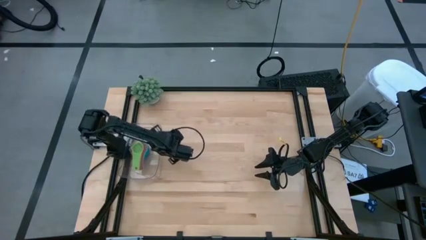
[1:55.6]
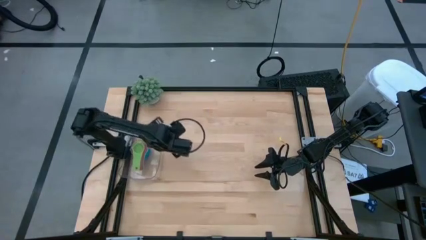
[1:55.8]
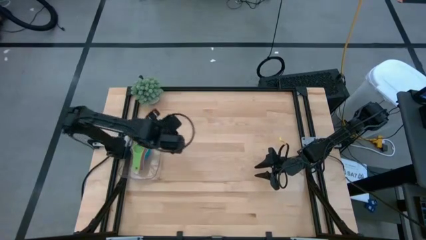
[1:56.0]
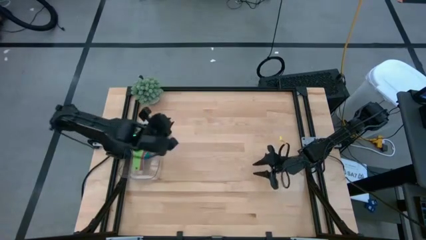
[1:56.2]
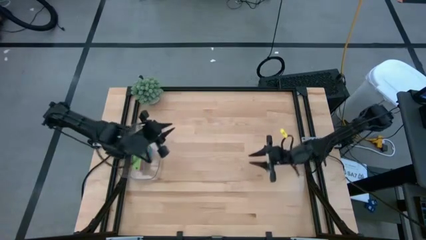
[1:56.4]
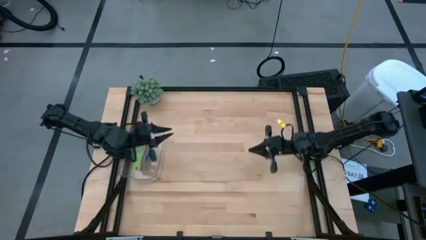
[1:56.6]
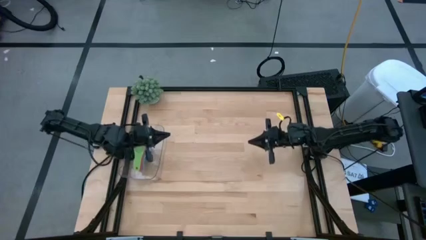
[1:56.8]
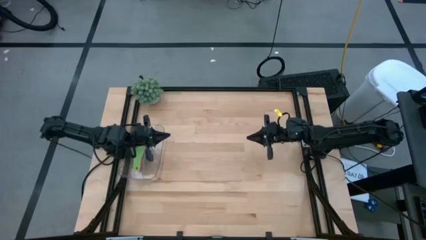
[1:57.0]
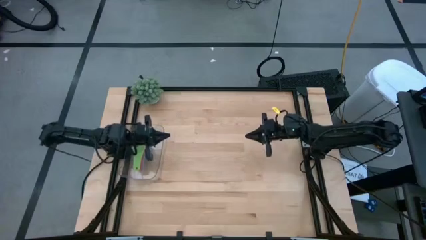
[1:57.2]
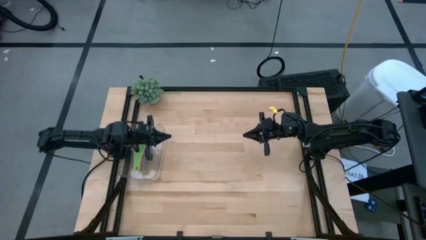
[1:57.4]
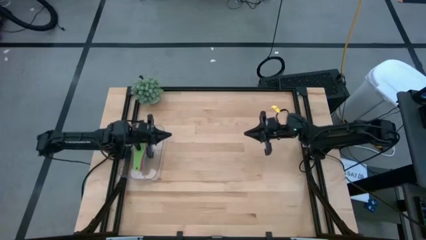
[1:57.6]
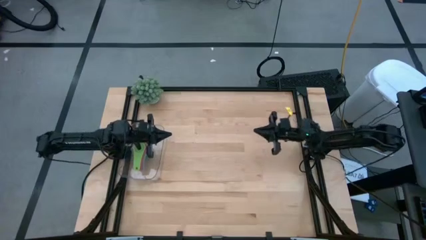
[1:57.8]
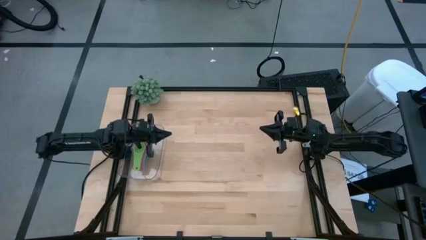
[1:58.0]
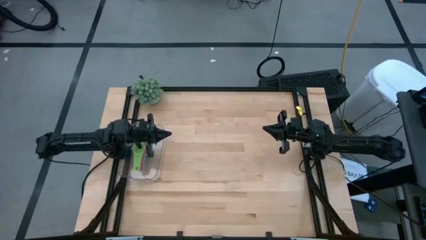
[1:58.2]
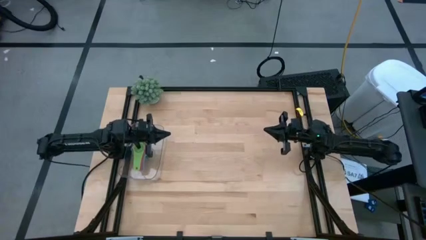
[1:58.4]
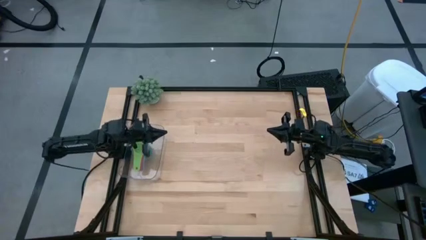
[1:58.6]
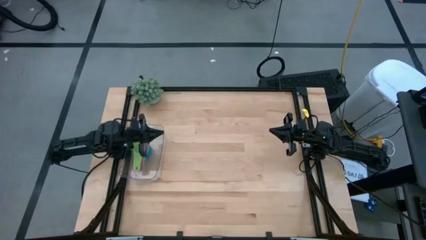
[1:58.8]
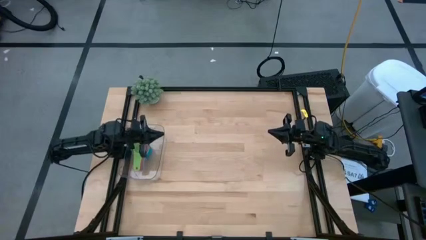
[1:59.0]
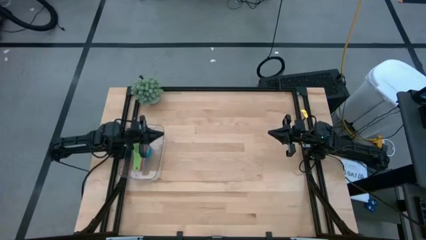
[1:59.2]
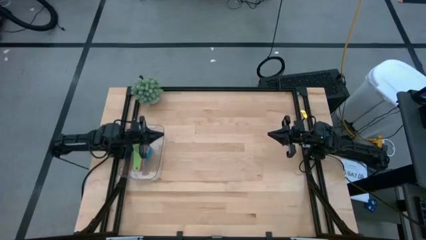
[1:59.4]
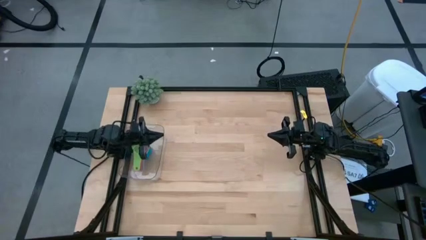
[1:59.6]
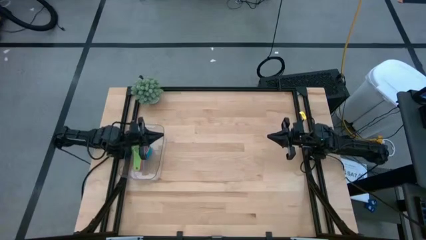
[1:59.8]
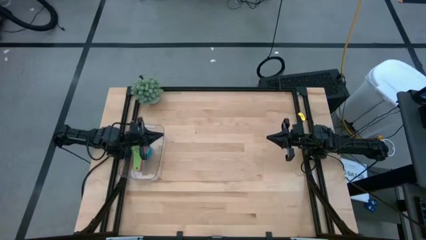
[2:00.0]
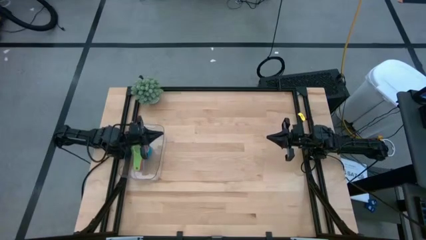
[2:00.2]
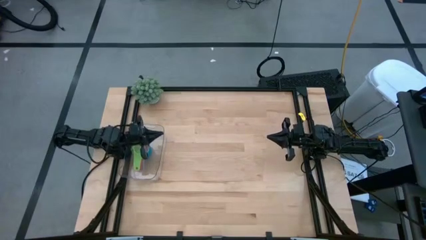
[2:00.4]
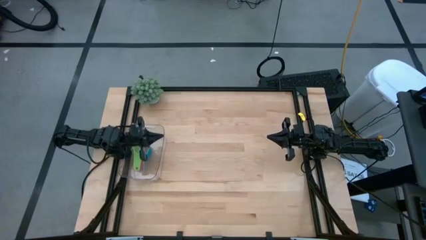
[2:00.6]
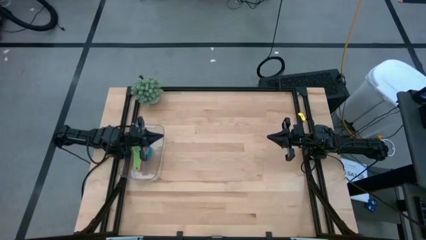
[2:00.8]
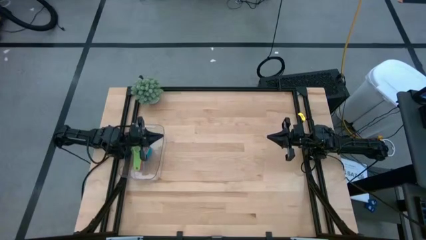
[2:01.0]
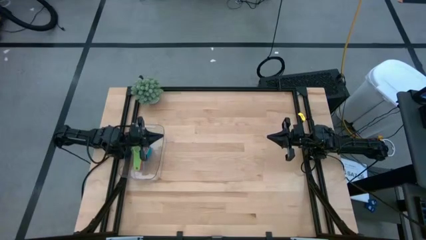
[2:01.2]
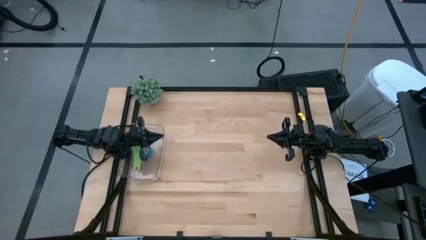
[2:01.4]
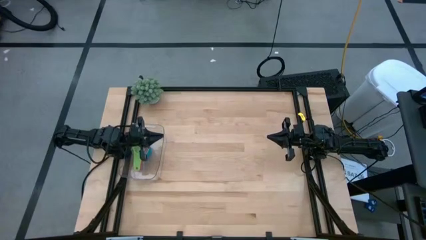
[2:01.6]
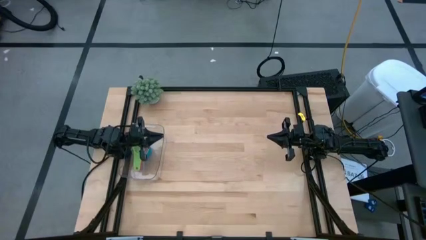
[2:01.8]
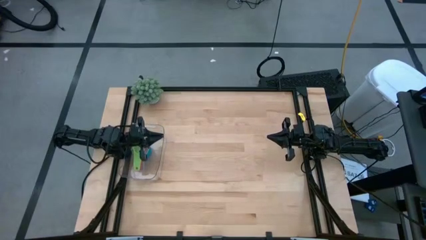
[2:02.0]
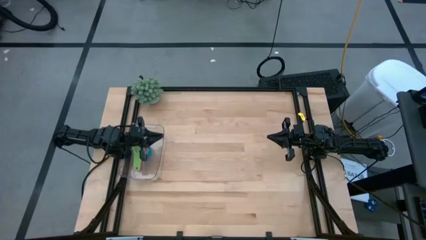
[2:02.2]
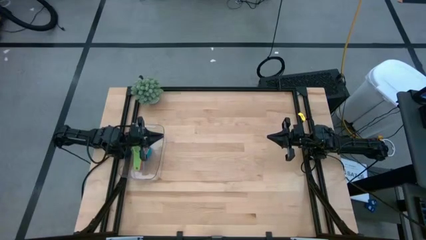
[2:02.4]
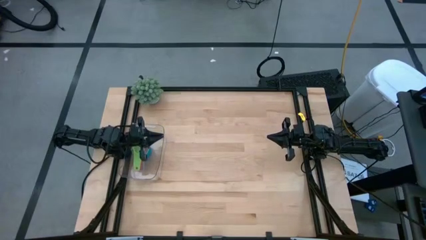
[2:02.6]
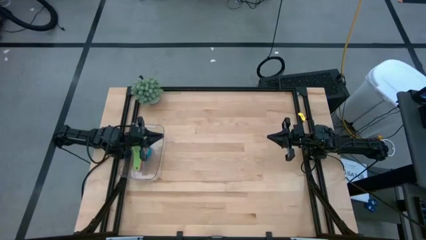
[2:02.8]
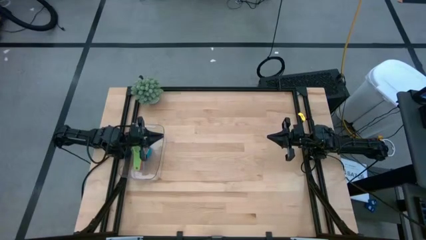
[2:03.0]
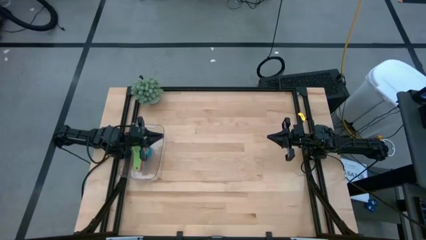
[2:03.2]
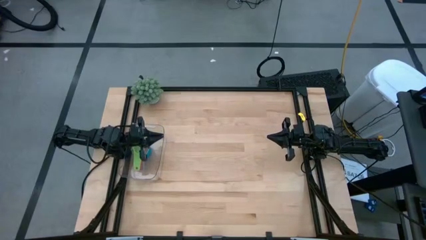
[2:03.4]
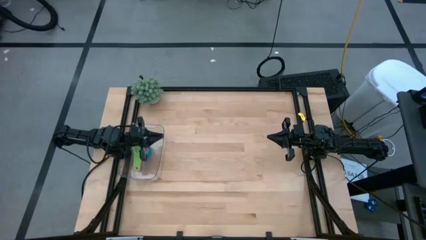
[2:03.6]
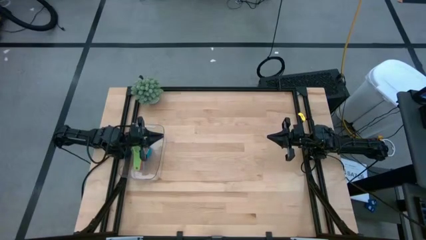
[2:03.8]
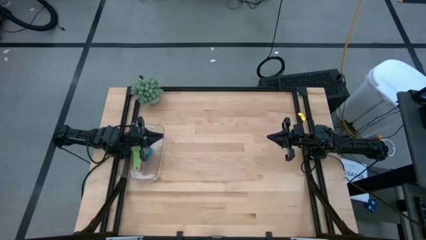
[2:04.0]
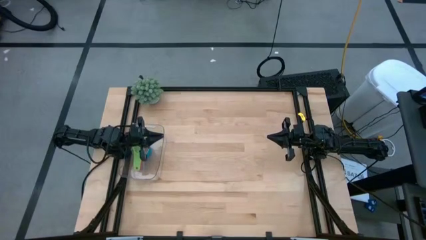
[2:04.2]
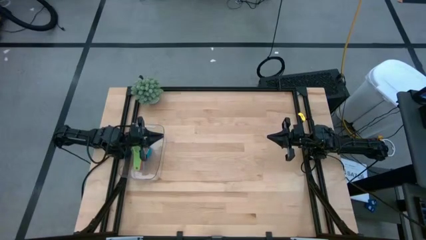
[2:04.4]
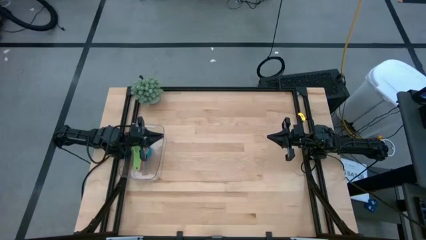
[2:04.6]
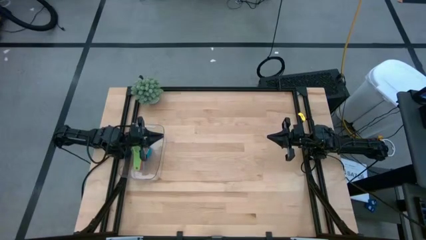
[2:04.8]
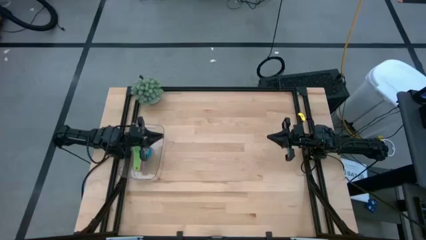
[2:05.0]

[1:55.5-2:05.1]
Task: Nest measuring cups in basket
Return to Home Position

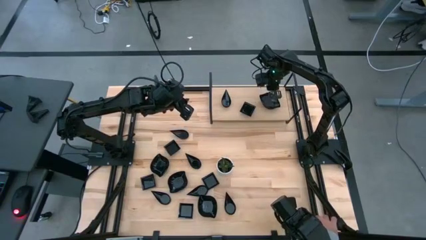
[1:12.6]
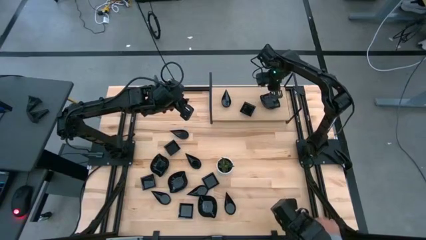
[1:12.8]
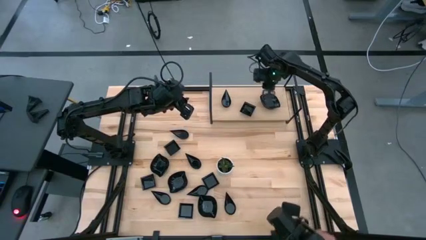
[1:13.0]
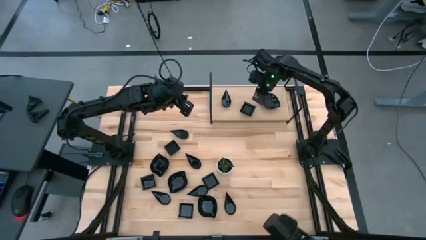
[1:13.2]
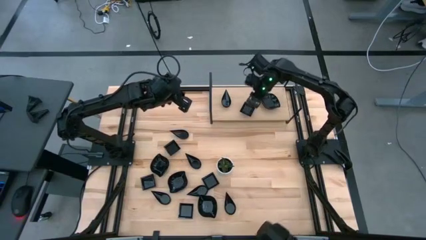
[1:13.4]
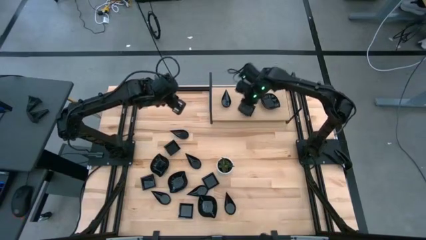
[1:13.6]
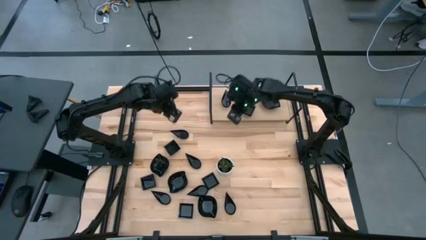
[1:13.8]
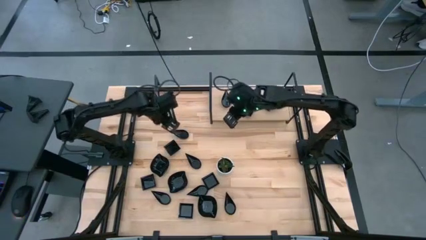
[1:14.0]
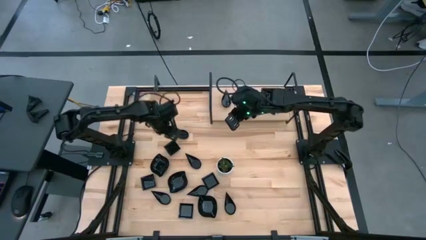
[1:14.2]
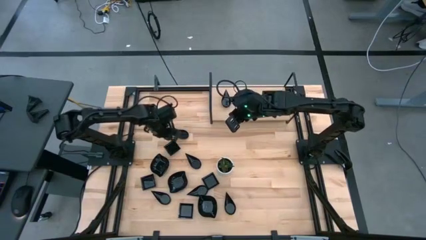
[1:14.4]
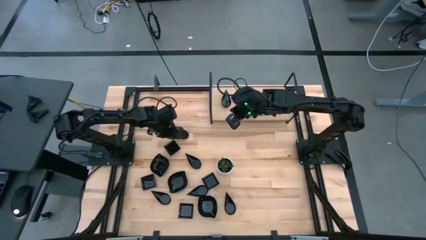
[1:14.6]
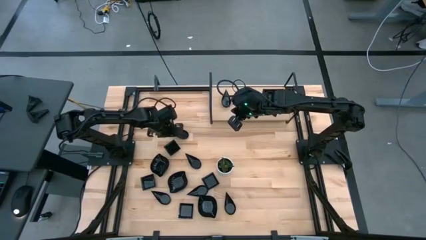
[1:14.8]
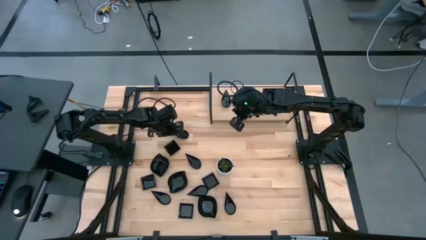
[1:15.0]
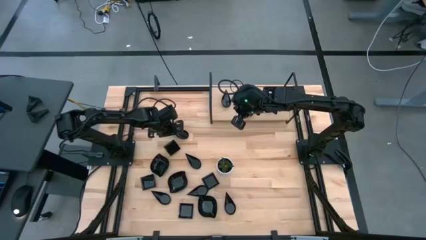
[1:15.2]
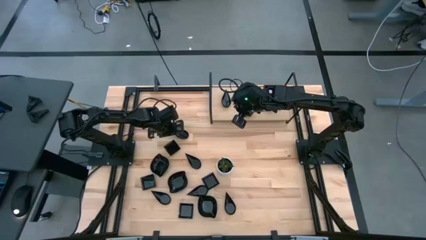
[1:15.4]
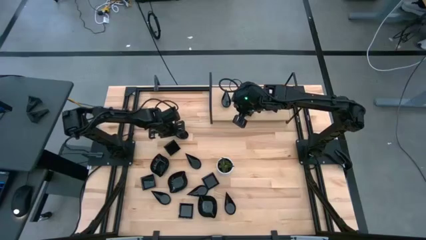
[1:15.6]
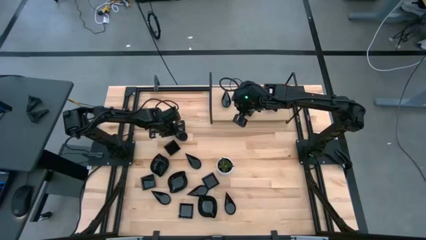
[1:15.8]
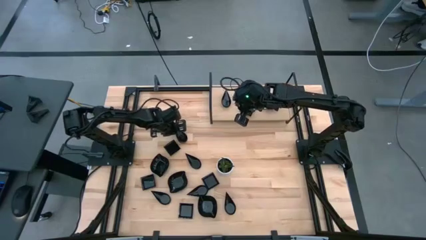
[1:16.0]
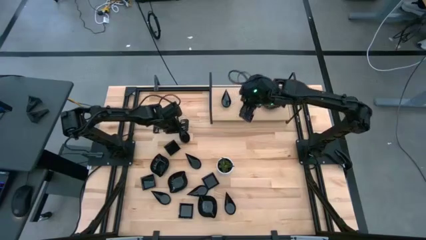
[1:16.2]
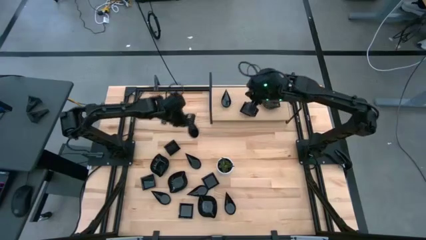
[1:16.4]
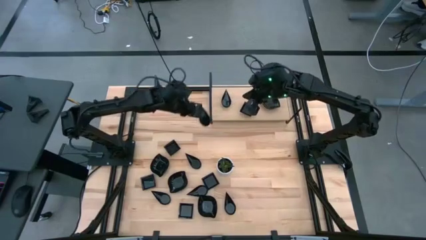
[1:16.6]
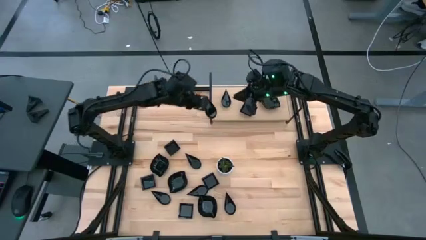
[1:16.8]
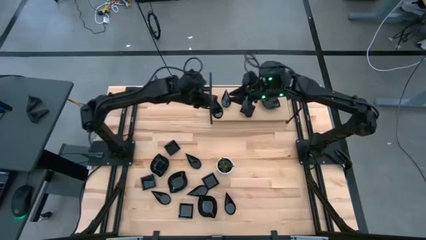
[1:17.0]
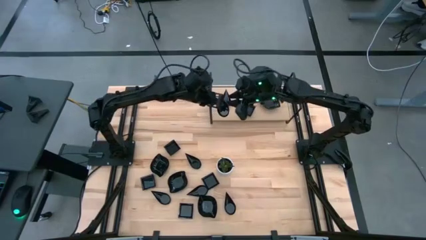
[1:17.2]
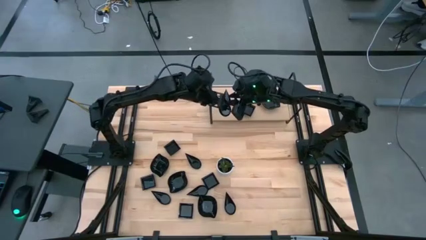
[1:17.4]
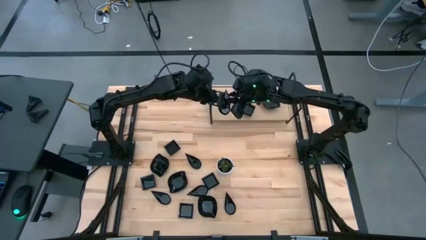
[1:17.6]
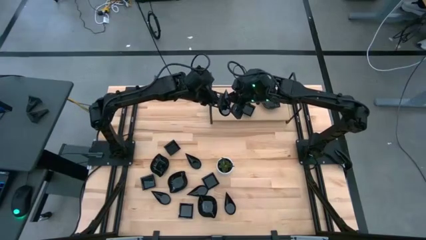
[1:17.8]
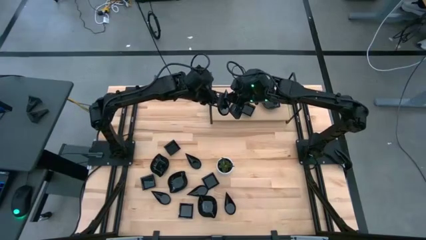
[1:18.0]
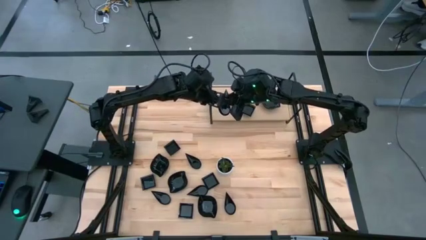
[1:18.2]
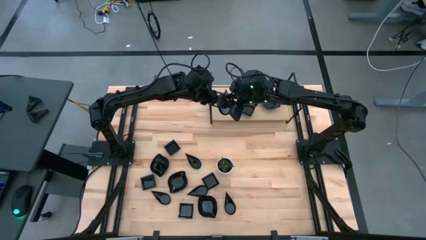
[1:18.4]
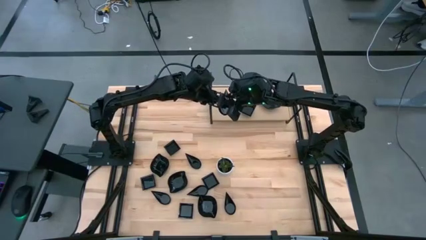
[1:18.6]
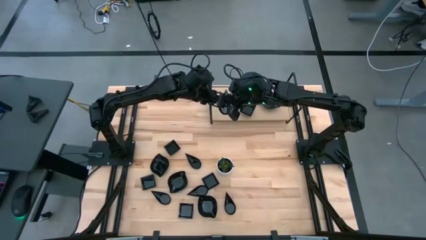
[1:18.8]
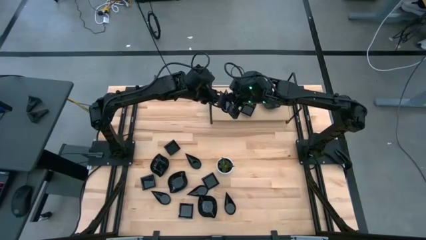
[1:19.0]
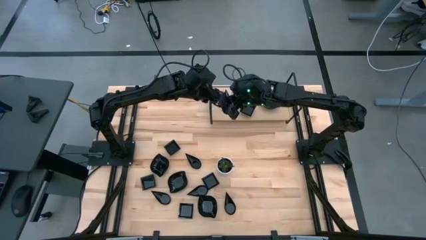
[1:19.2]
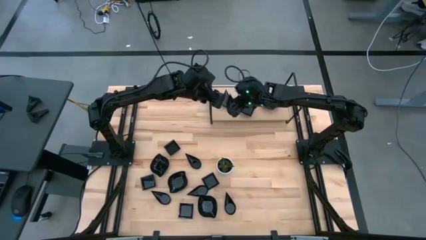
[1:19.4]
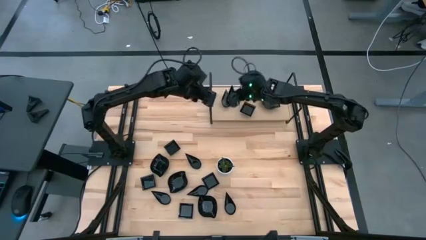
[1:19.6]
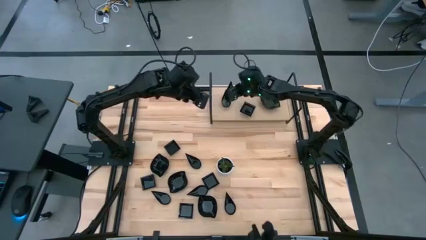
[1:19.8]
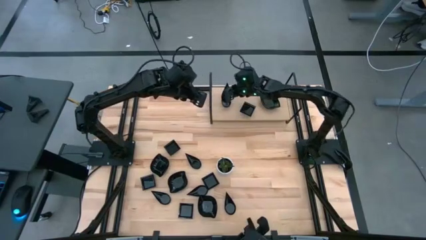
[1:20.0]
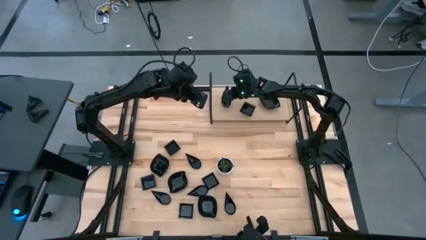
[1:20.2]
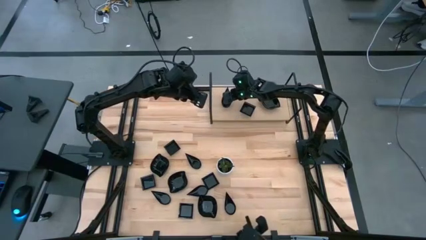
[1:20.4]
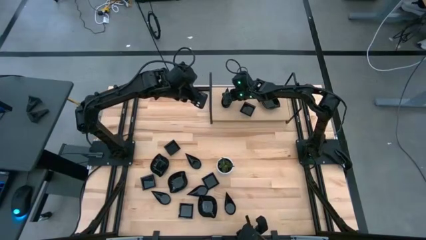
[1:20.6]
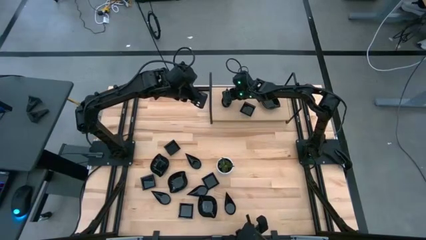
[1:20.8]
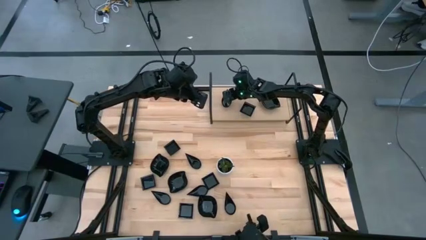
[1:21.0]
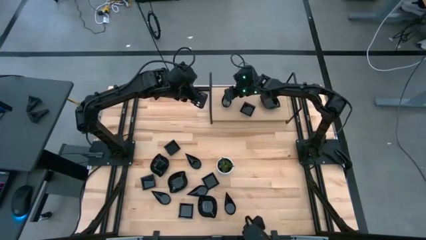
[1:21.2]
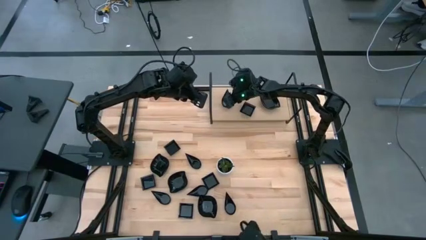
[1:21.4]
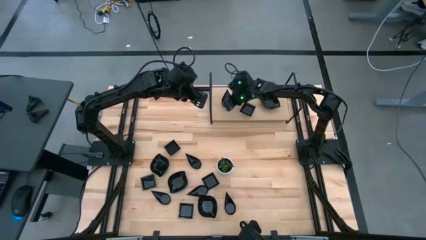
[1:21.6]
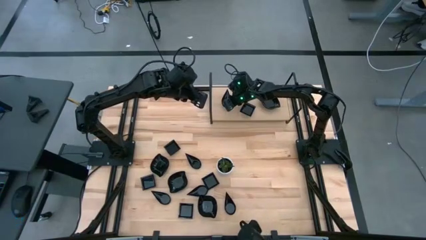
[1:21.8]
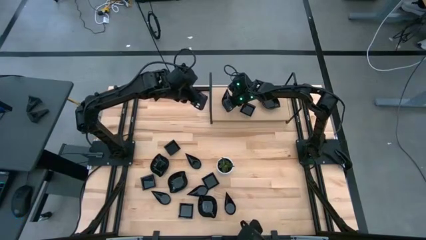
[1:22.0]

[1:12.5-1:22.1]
Task: Pick & Place Mini shaped plates
Stack the drop shaped plate on top of the drop shaped plate on the shelf
